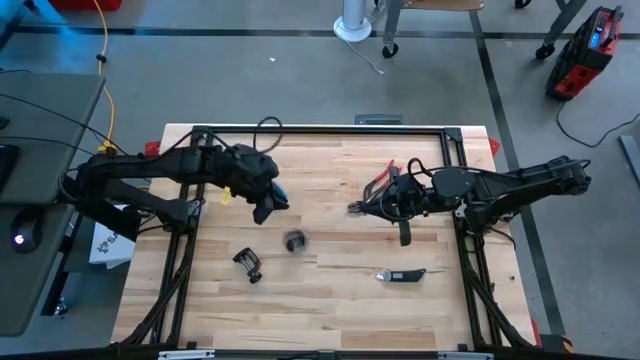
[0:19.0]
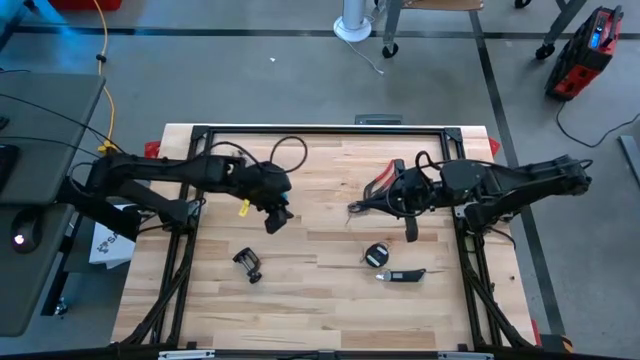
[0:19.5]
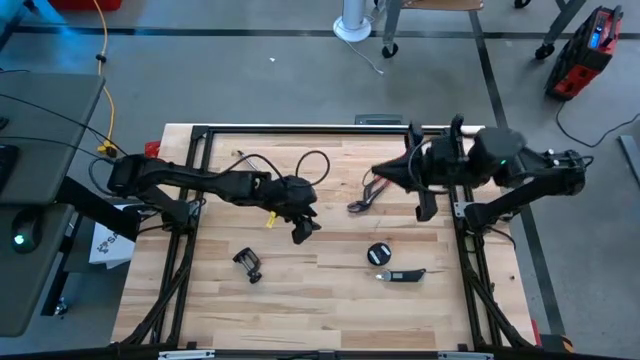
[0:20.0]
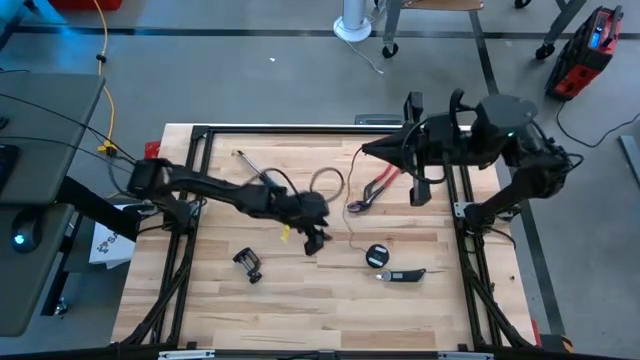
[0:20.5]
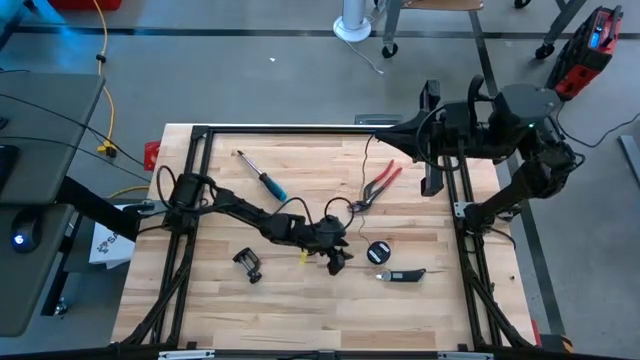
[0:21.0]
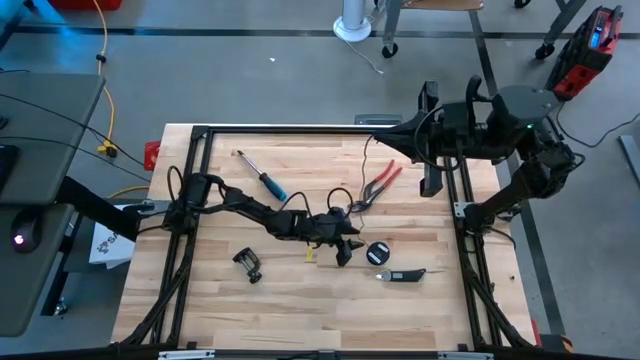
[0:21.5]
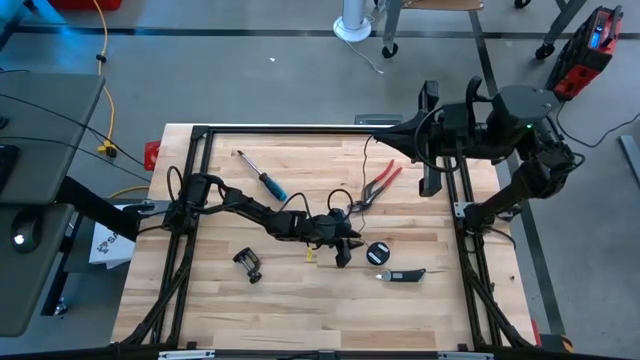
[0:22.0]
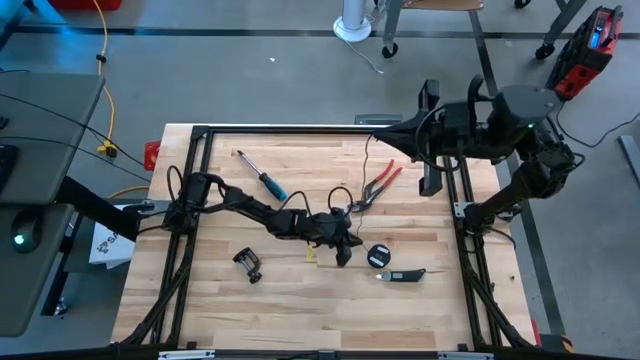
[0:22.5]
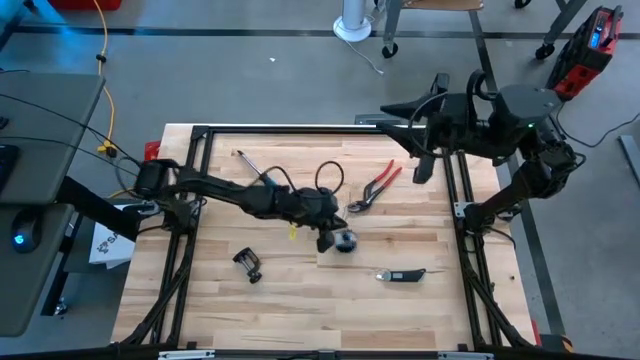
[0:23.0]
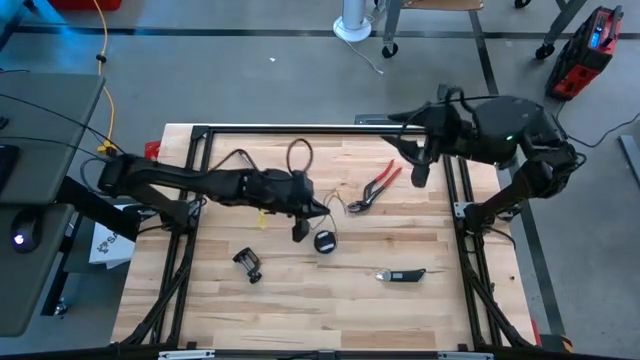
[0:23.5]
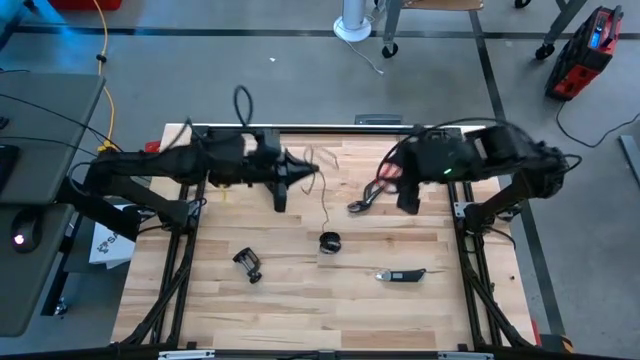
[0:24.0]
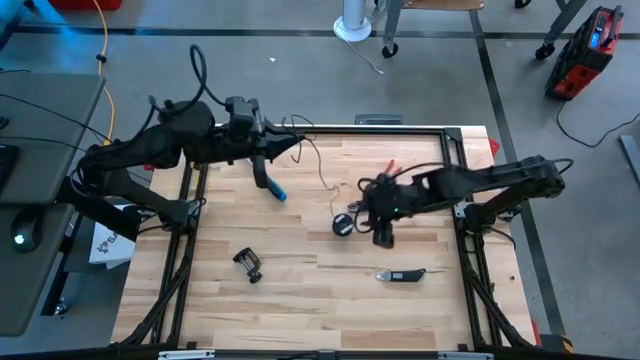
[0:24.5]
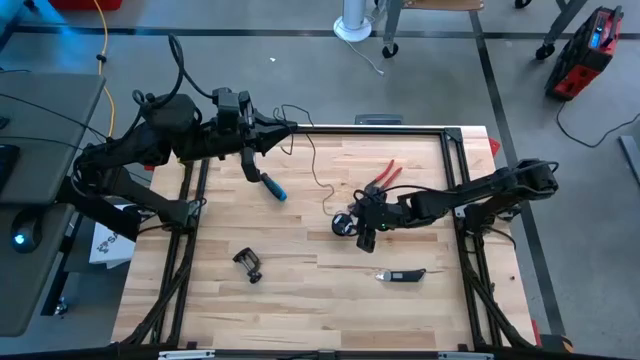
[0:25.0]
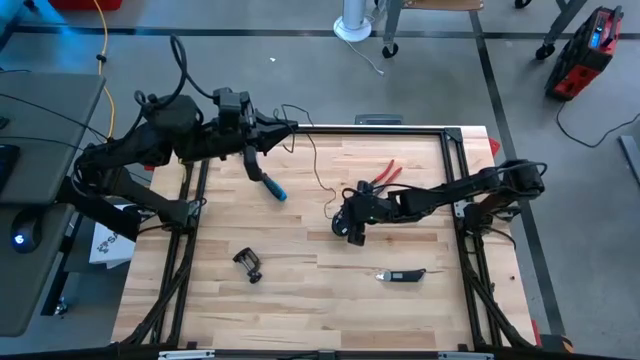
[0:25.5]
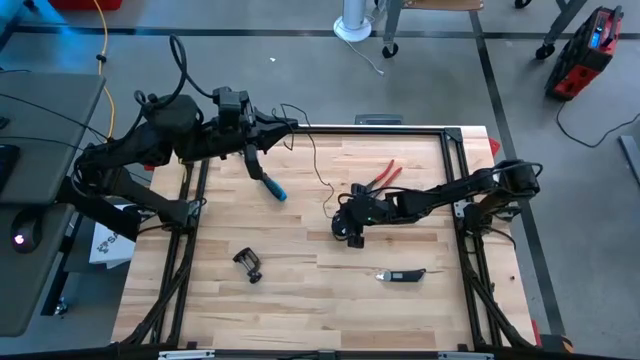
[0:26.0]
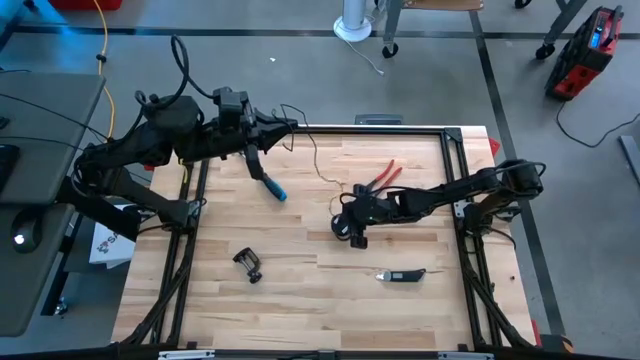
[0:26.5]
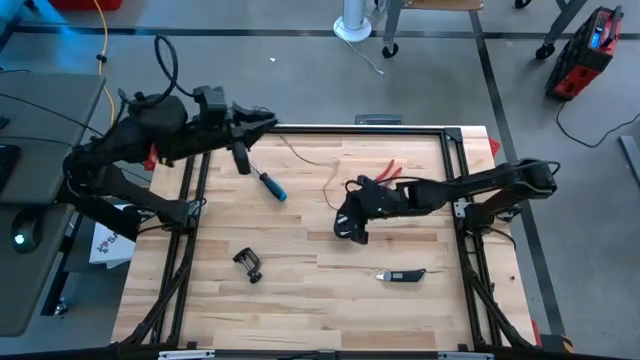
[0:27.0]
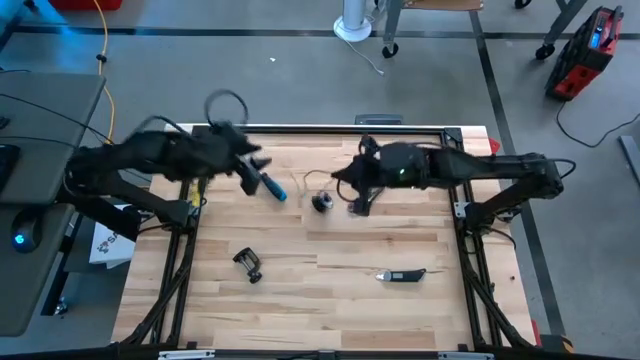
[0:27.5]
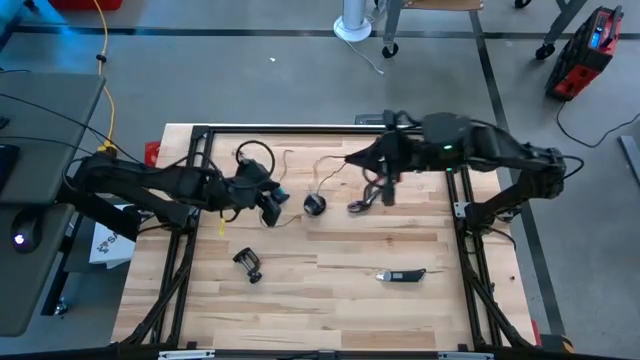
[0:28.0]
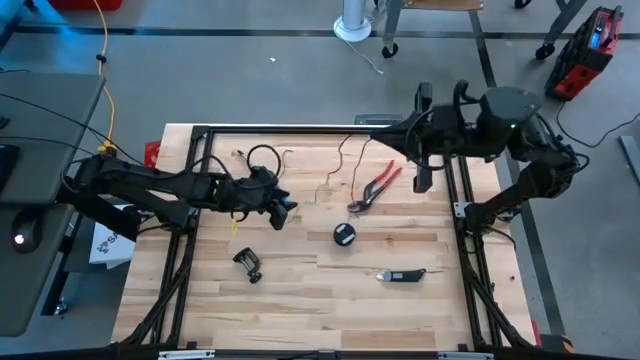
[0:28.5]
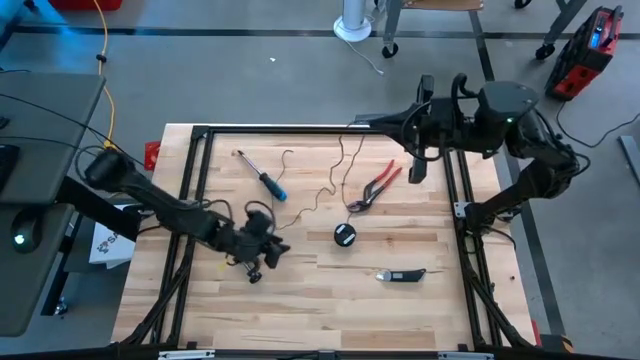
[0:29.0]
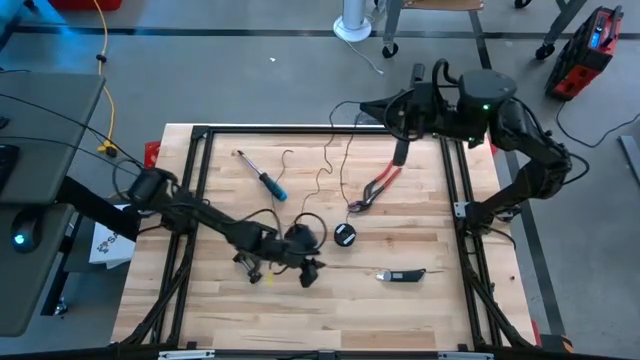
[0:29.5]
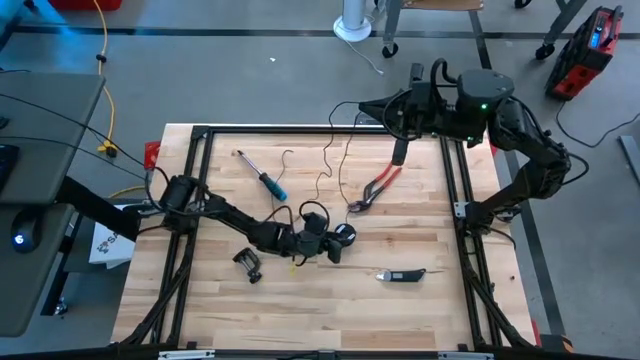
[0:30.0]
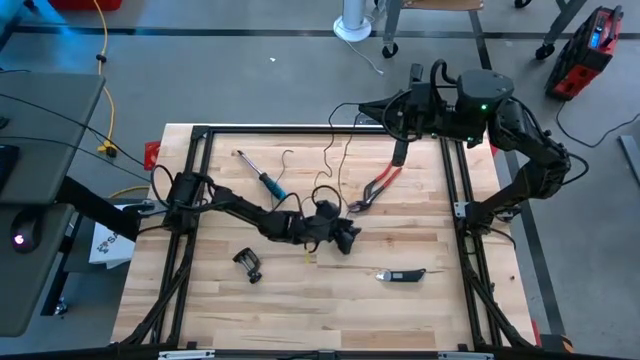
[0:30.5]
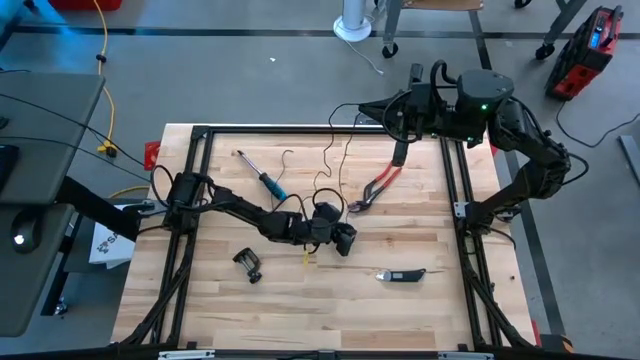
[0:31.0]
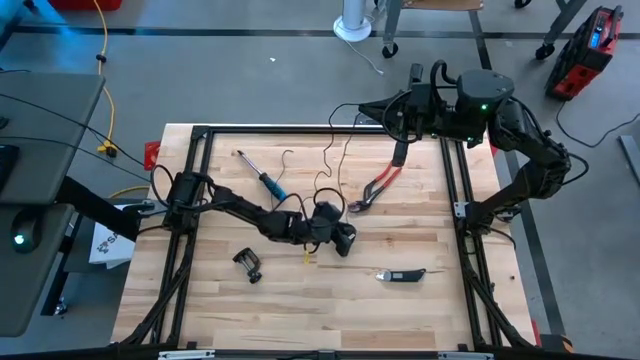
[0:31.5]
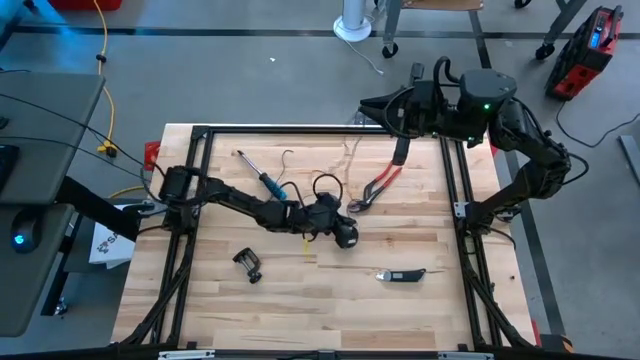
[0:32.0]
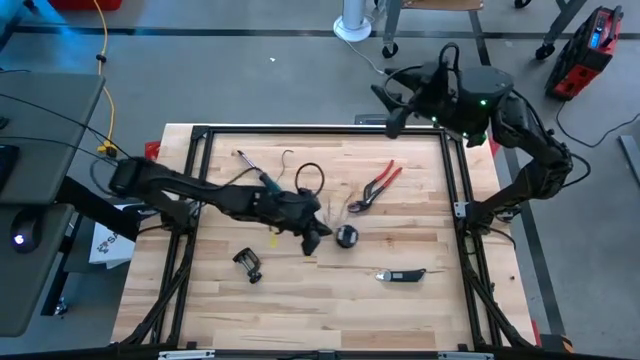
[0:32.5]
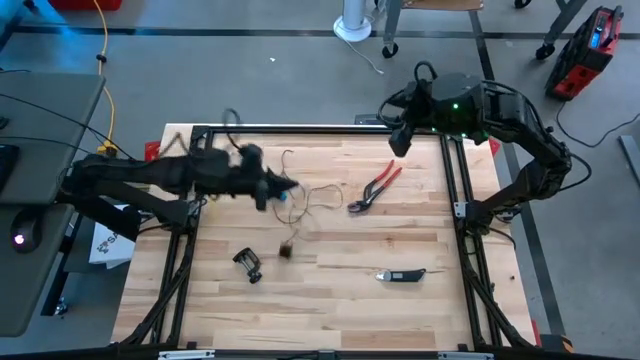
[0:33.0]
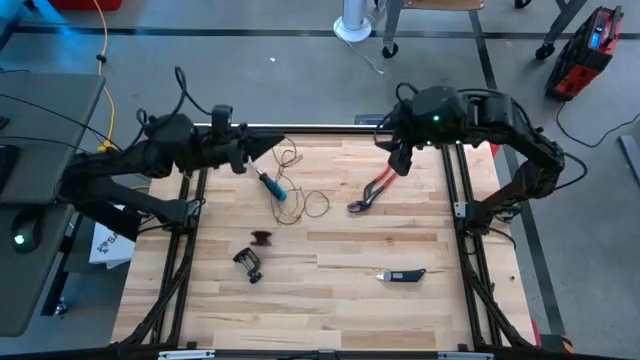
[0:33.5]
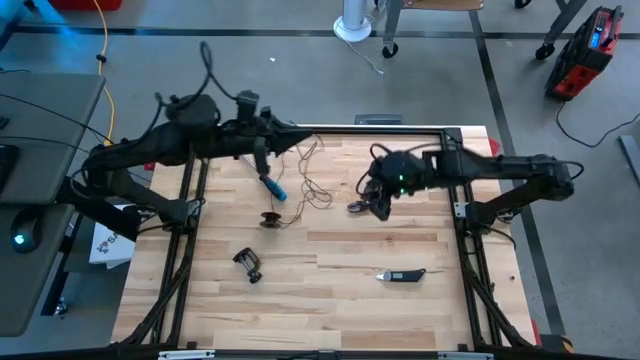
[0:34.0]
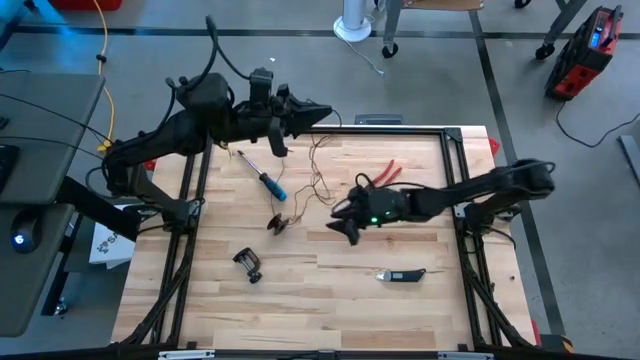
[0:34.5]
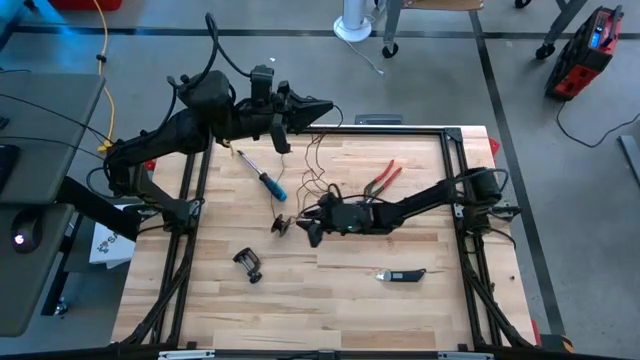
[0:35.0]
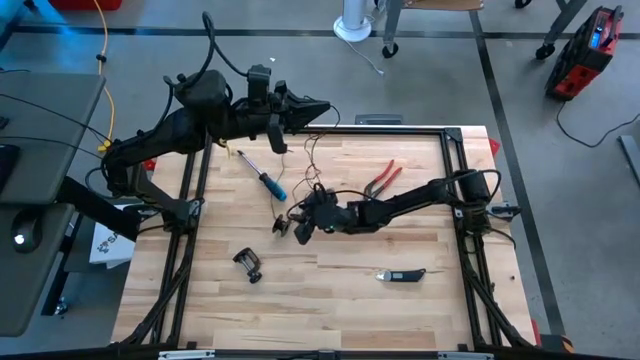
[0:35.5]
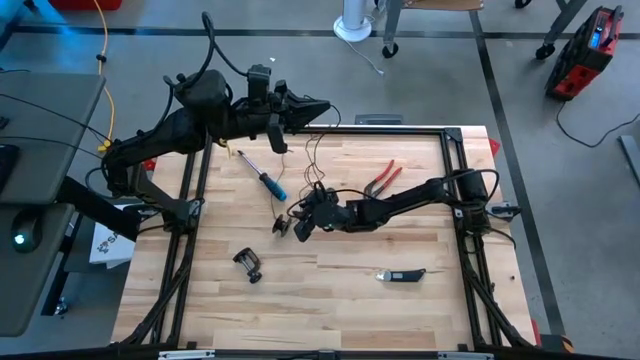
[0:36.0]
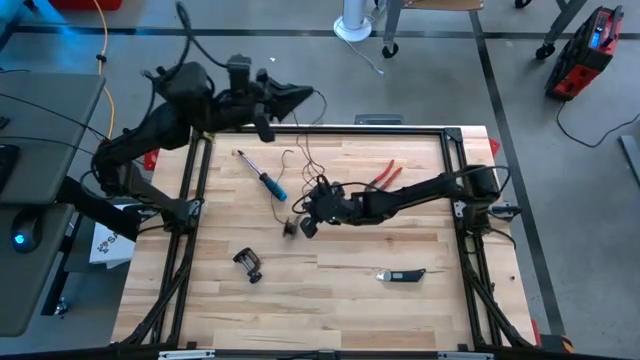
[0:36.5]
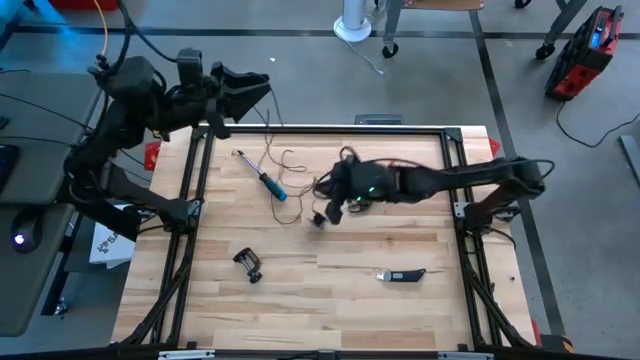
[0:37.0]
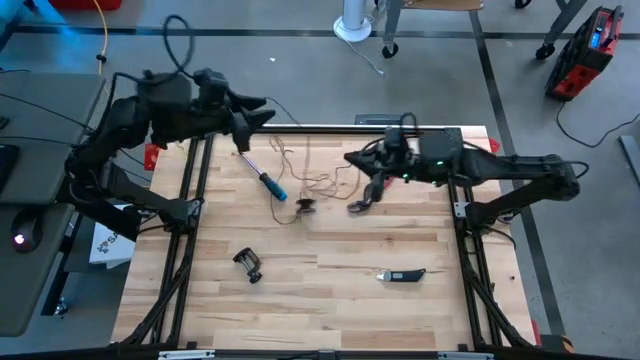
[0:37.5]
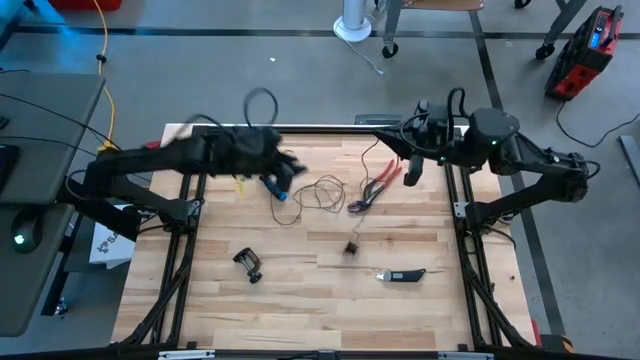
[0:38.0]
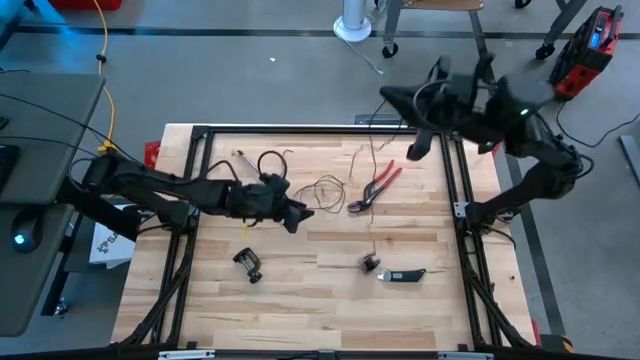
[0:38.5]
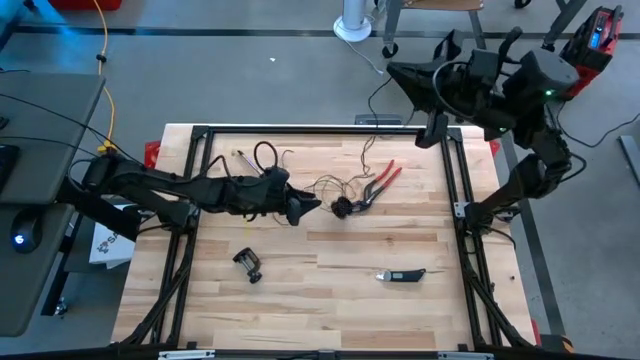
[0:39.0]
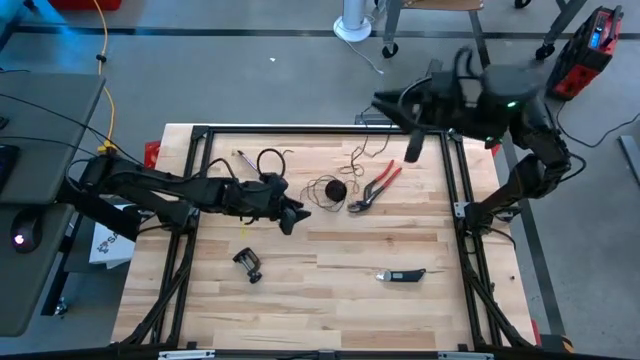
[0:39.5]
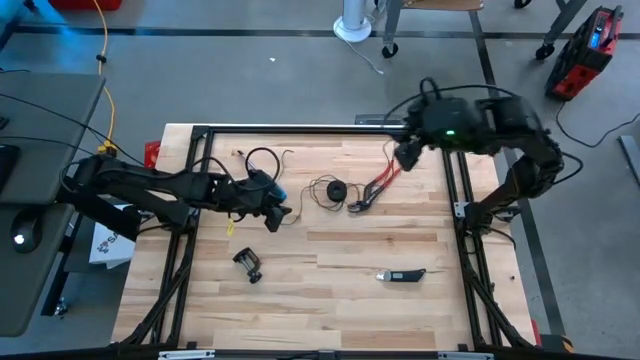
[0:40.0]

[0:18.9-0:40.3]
Task: Coil cords
Uncoil the black wire from the black spool
